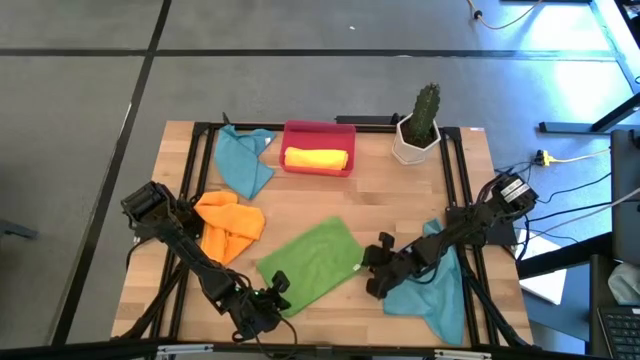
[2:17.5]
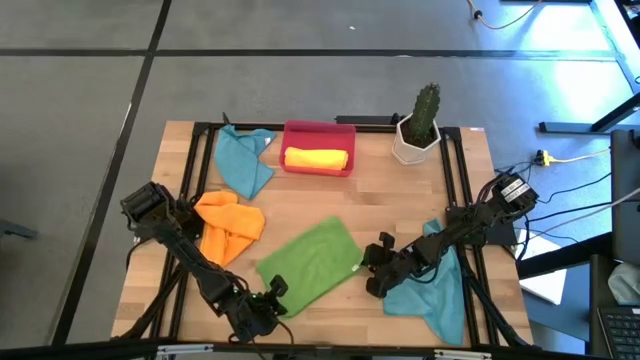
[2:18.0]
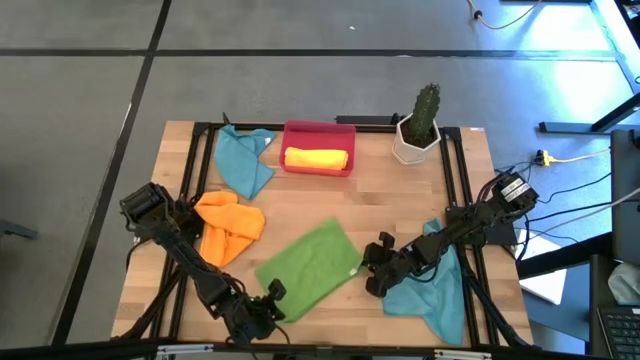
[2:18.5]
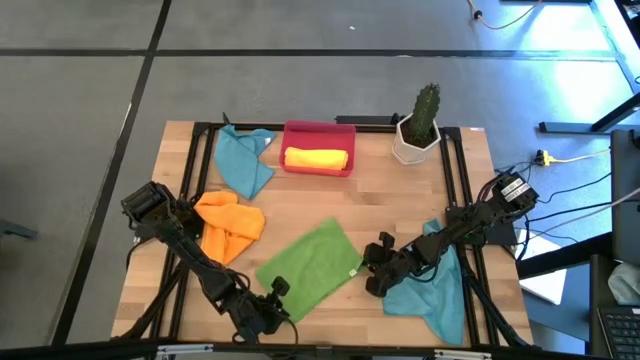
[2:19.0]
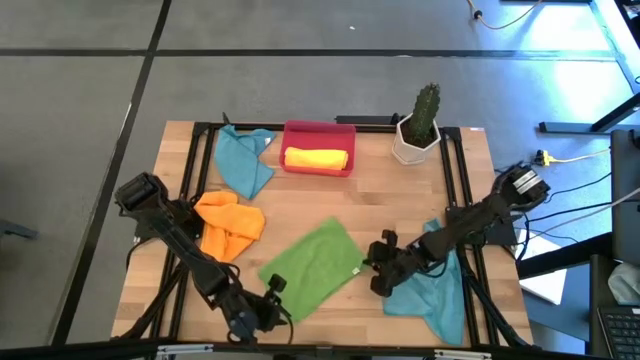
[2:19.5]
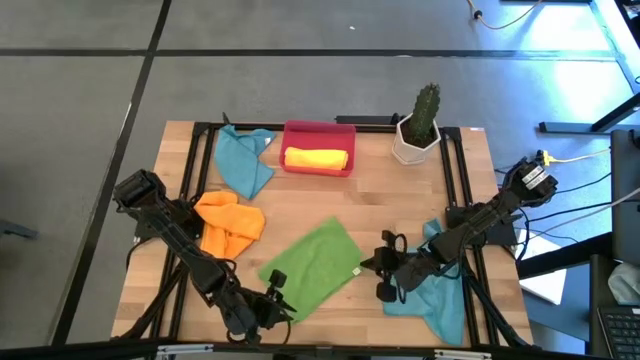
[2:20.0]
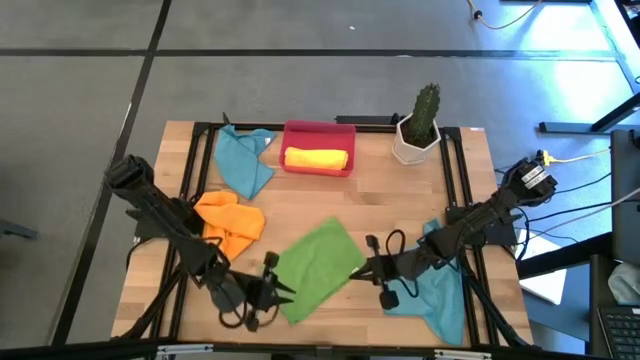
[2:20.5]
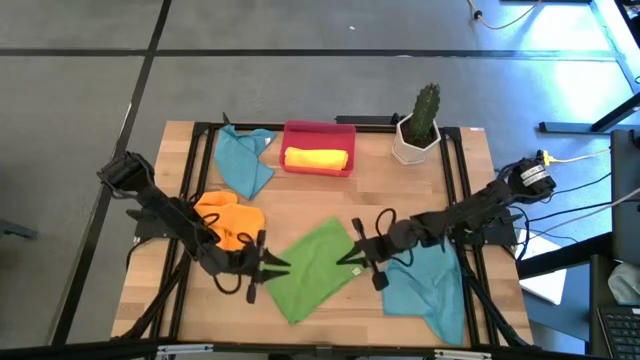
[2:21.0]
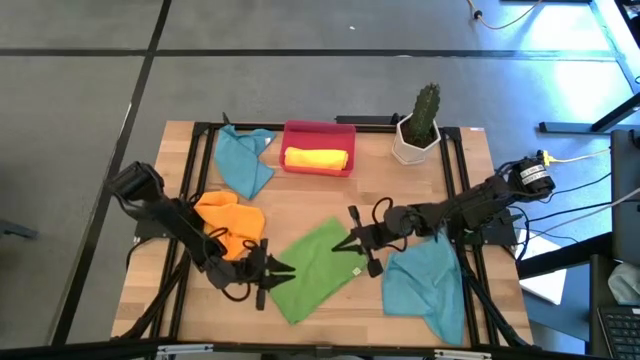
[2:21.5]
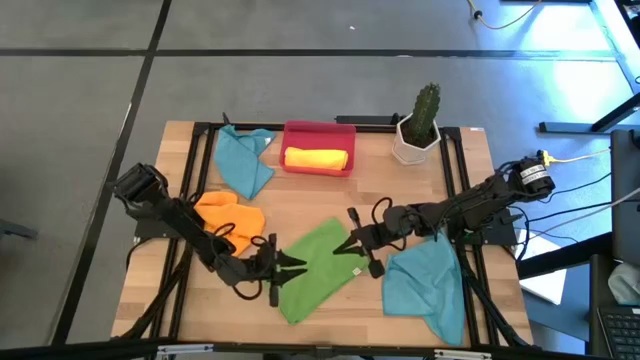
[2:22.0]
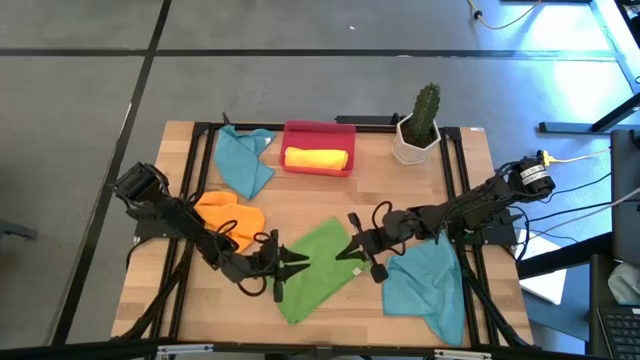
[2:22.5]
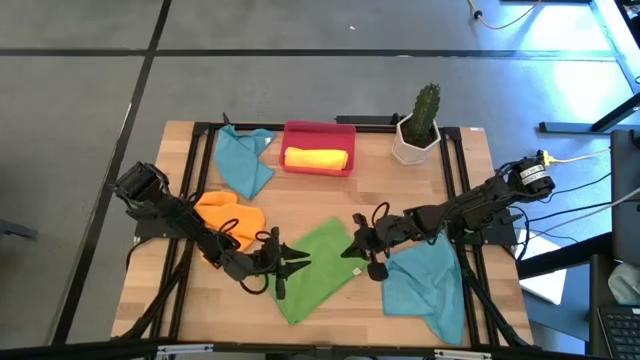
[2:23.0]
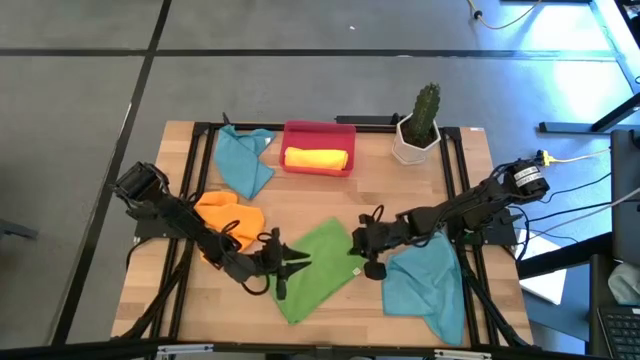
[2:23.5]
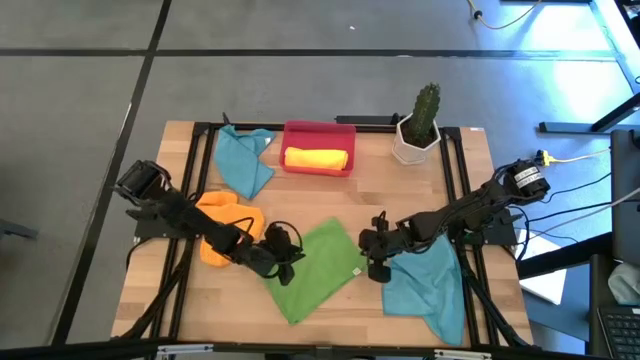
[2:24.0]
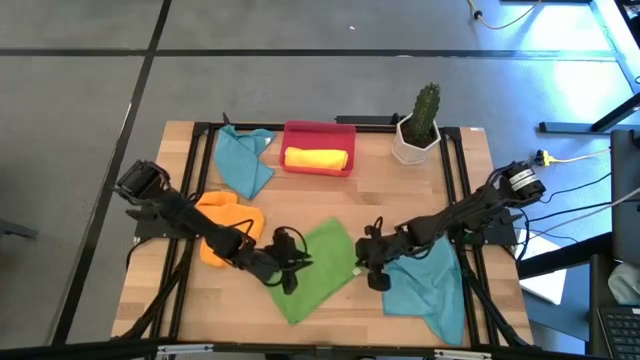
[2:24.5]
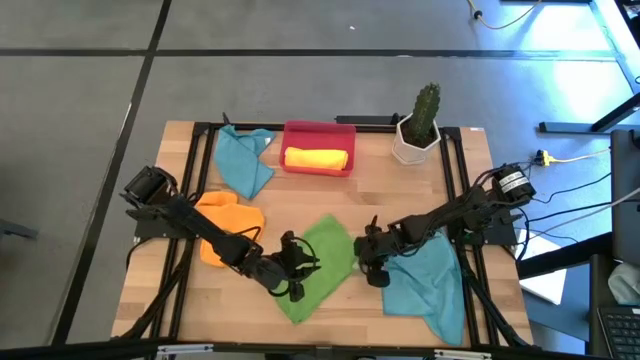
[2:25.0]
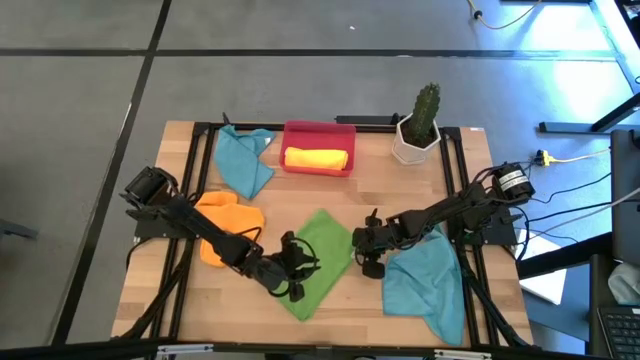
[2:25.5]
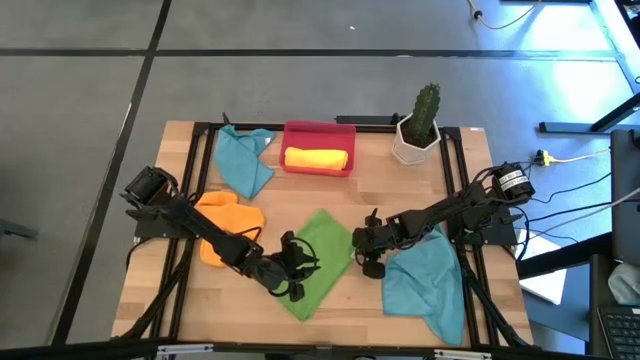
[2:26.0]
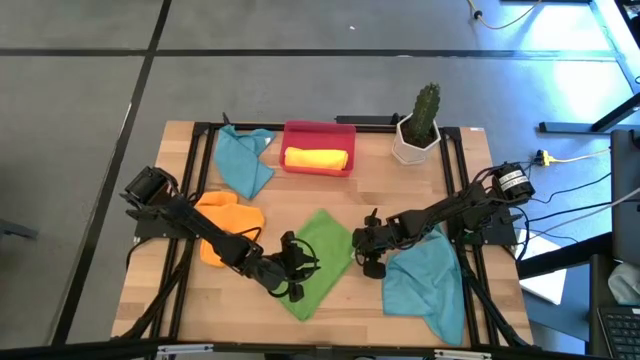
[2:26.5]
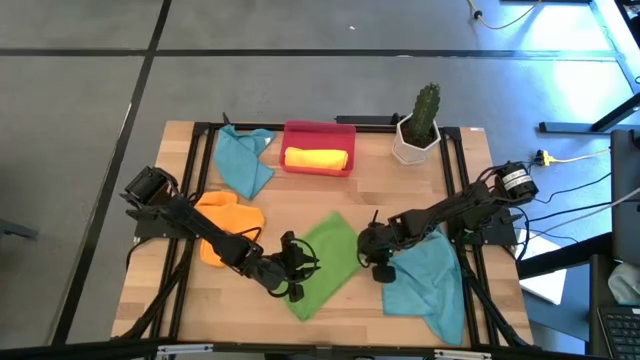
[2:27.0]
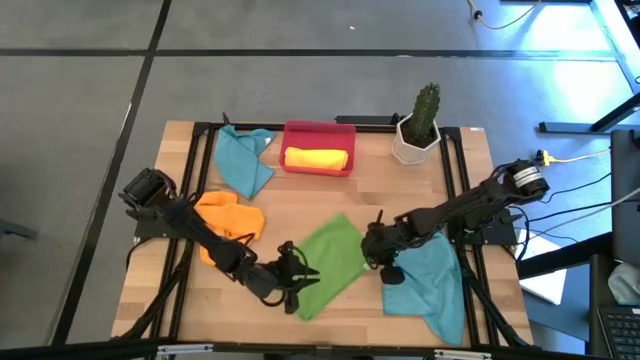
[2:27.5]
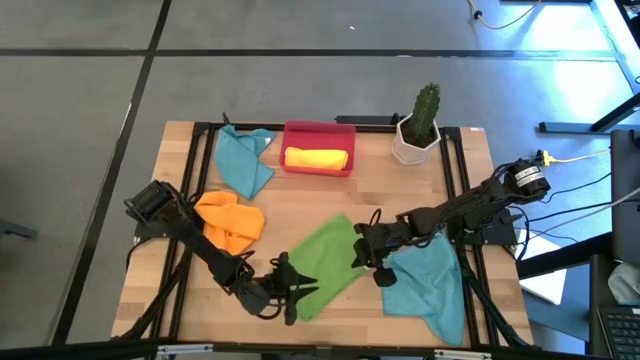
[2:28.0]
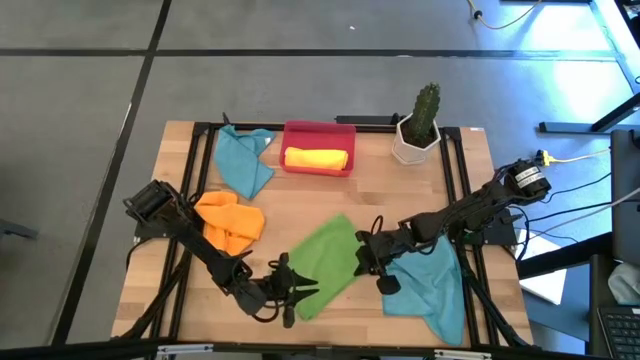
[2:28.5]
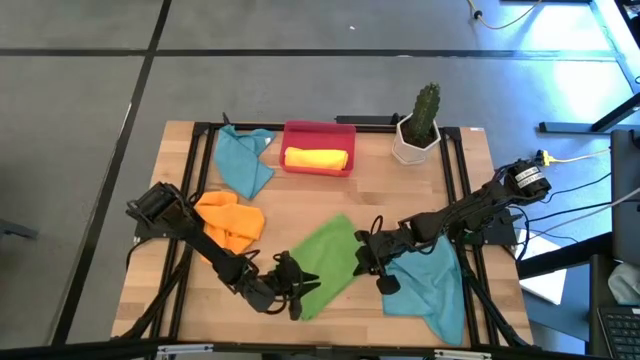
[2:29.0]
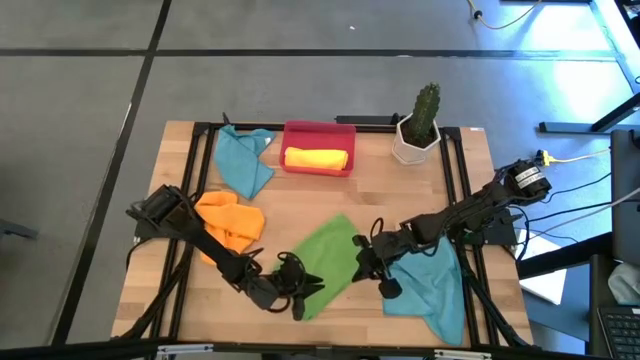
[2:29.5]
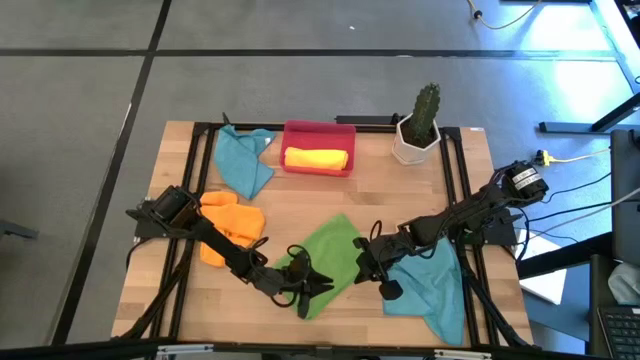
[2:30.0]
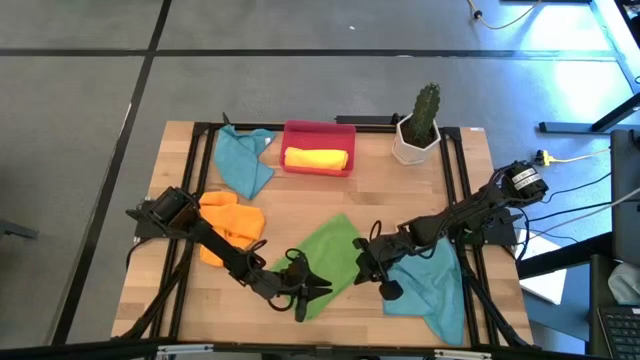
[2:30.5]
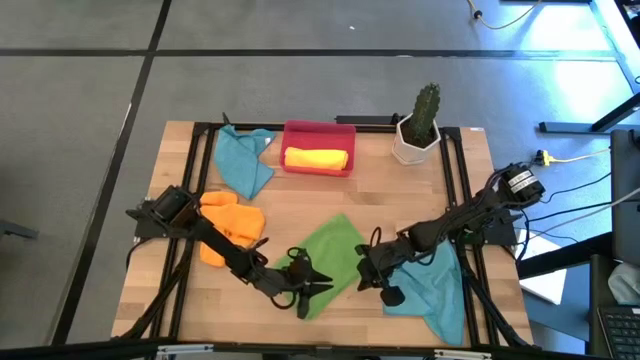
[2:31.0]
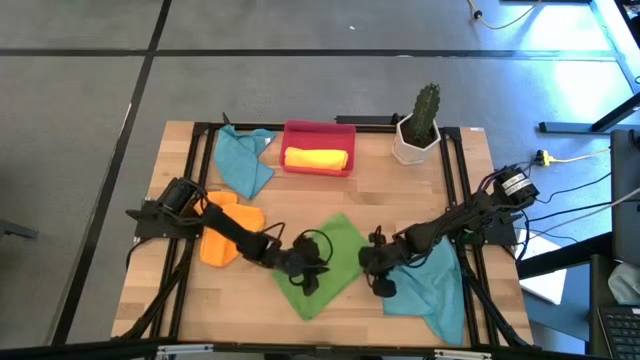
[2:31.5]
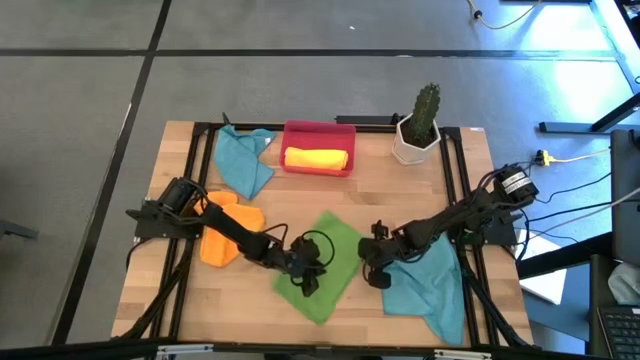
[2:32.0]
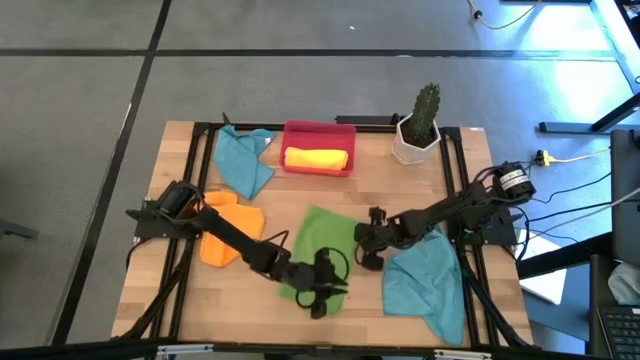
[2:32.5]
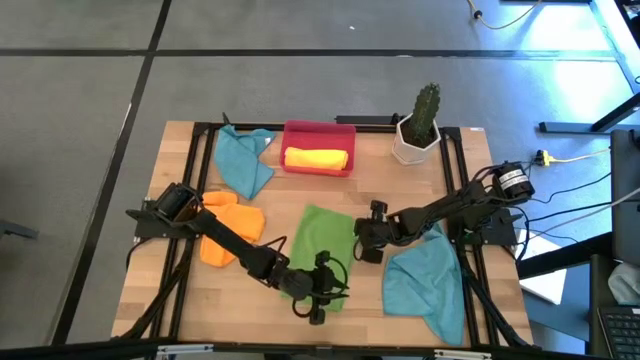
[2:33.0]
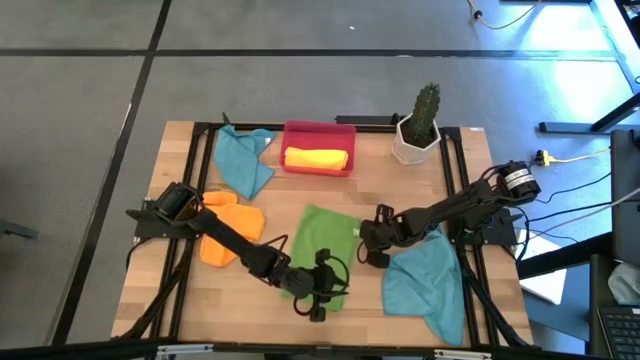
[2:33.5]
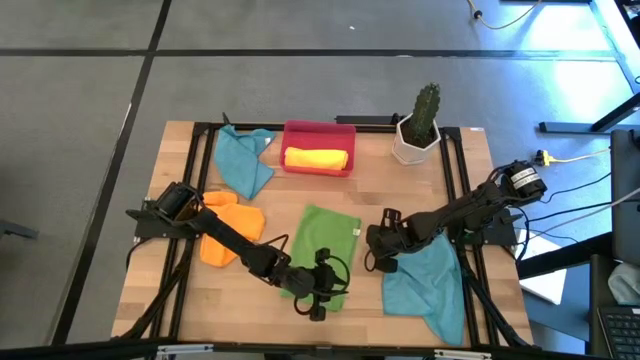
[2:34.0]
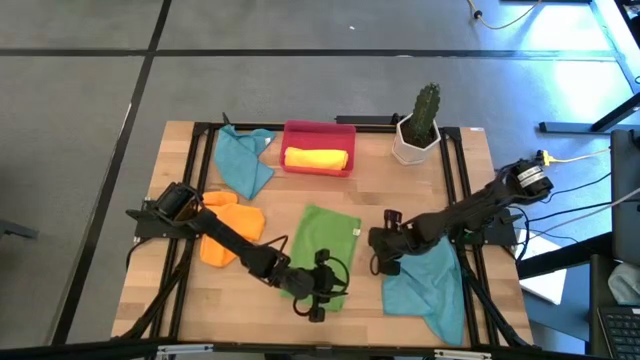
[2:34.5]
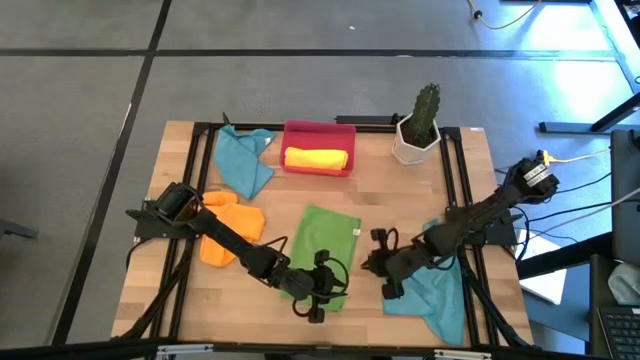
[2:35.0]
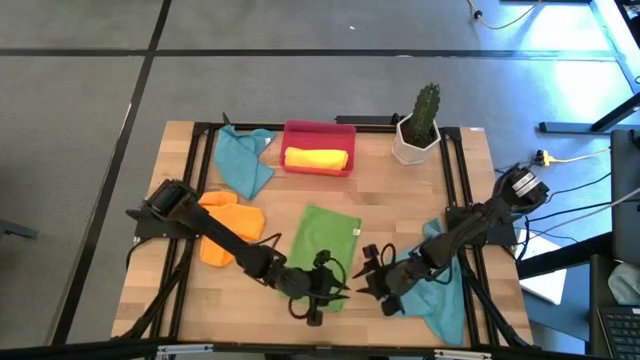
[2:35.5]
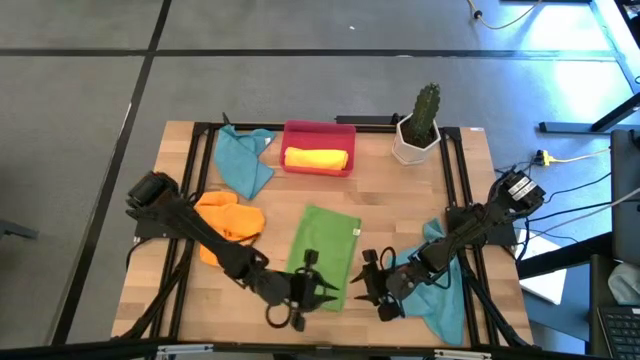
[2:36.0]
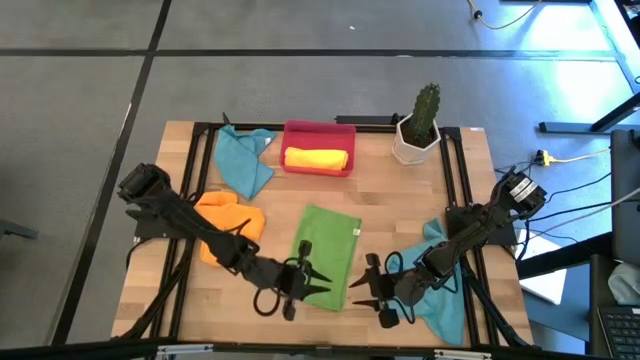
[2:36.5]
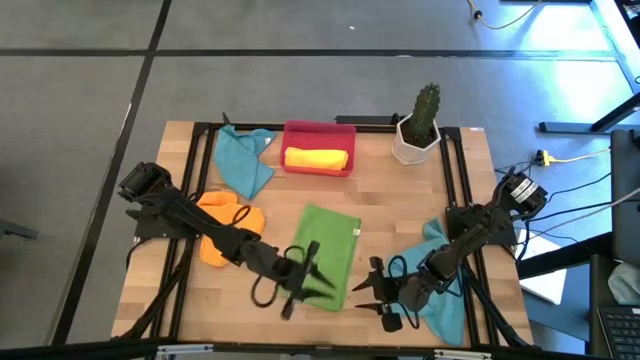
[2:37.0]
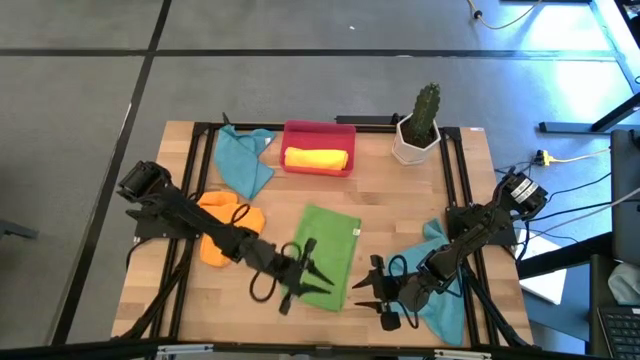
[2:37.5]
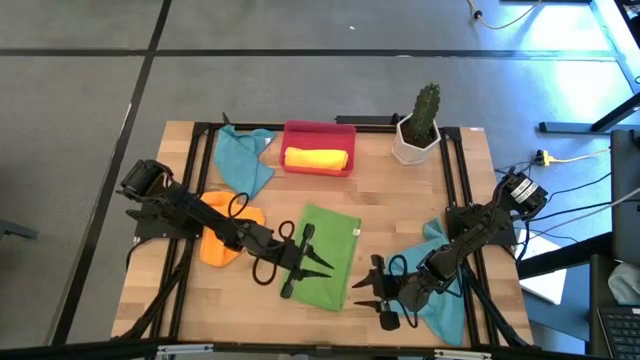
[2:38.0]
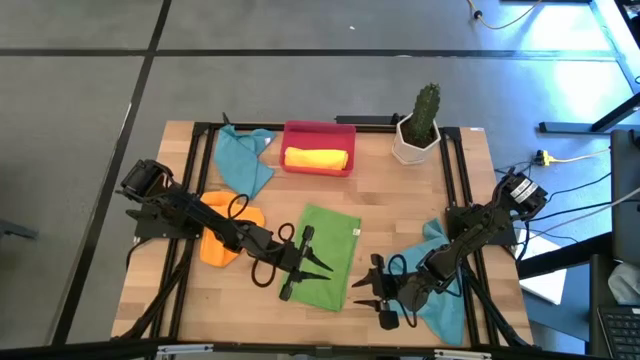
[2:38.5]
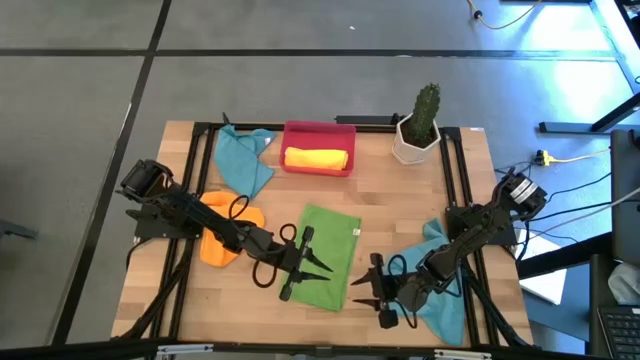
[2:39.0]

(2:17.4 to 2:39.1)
Task: Roll microfiber towels into tight, uniform cylinder then place into a basket
Roll the green towel
